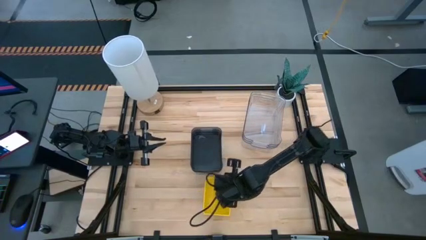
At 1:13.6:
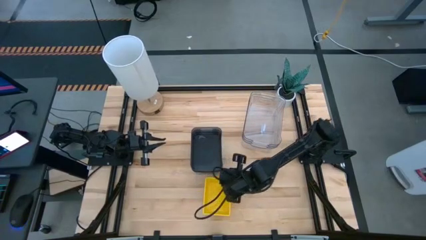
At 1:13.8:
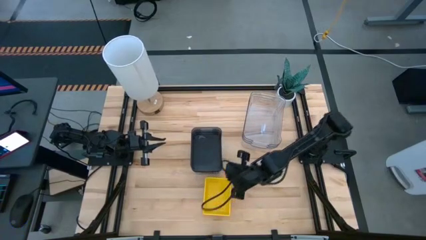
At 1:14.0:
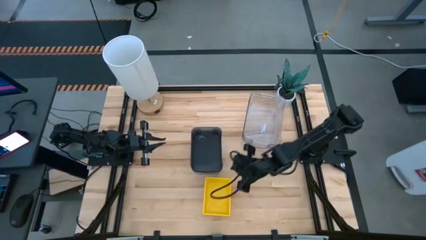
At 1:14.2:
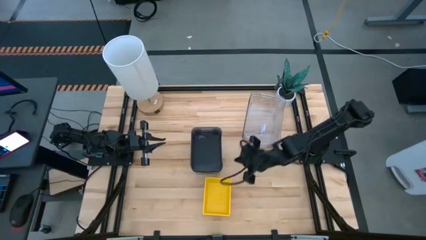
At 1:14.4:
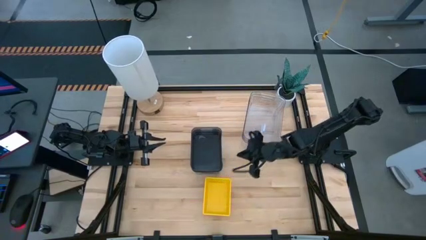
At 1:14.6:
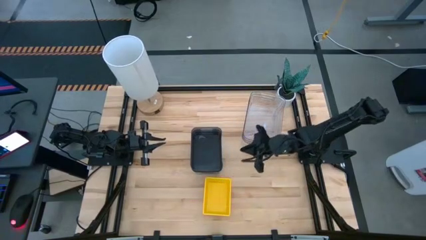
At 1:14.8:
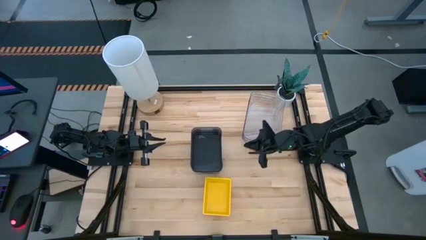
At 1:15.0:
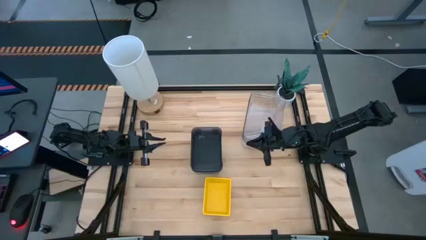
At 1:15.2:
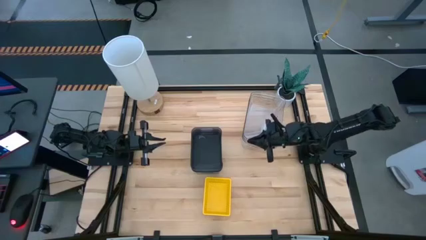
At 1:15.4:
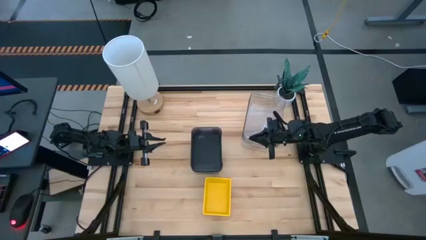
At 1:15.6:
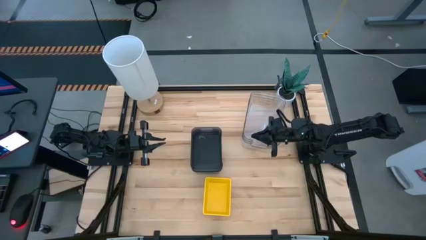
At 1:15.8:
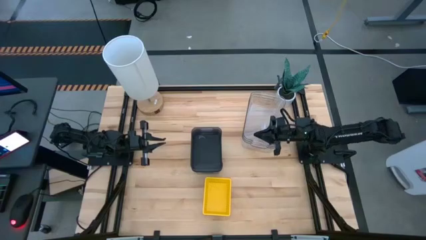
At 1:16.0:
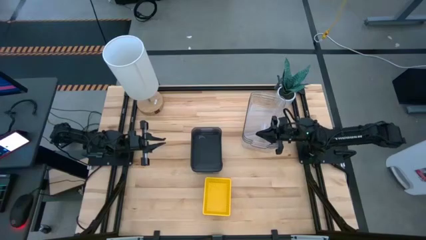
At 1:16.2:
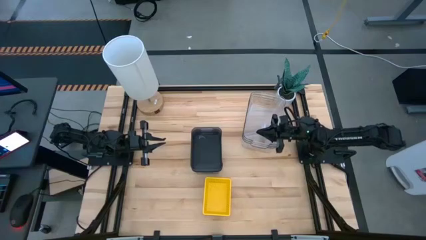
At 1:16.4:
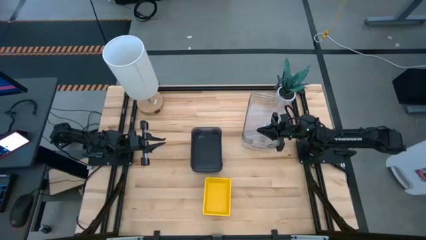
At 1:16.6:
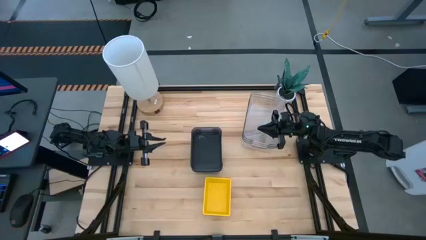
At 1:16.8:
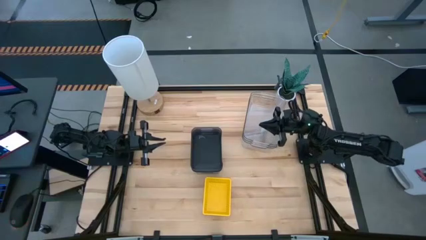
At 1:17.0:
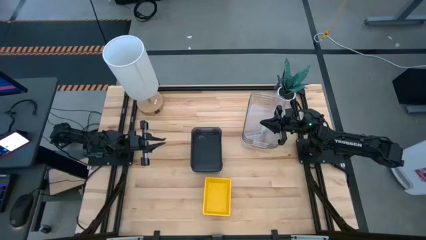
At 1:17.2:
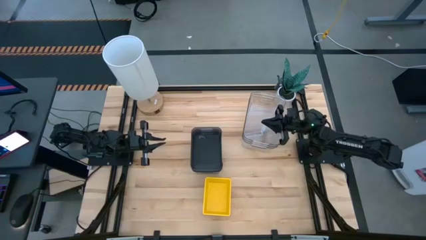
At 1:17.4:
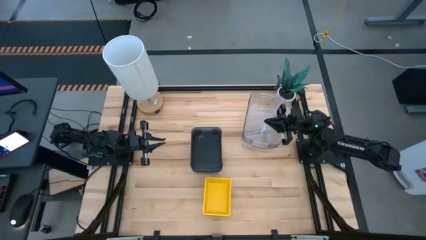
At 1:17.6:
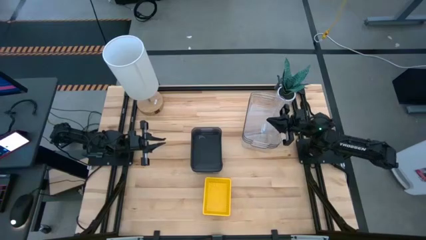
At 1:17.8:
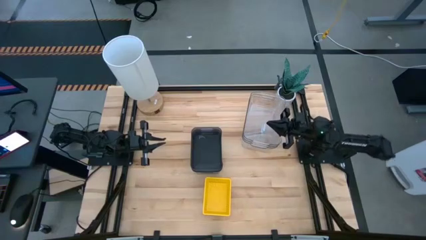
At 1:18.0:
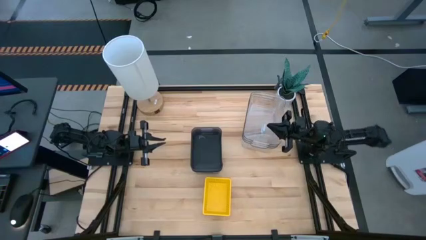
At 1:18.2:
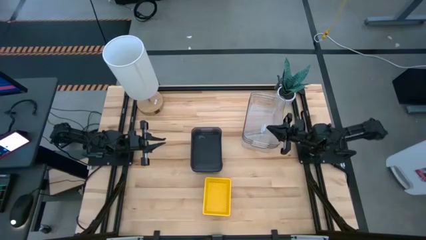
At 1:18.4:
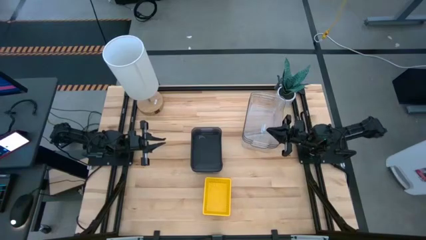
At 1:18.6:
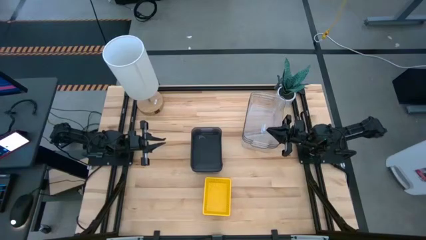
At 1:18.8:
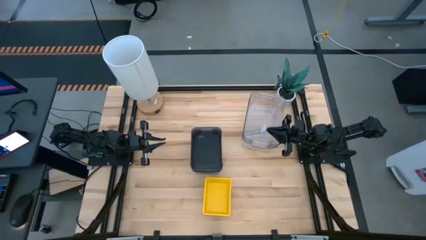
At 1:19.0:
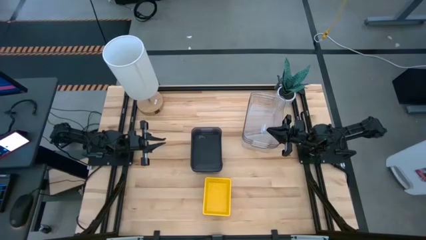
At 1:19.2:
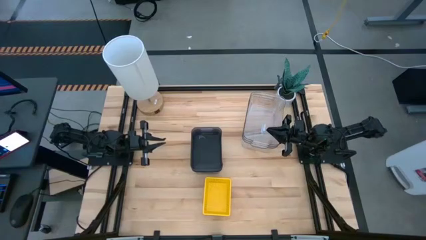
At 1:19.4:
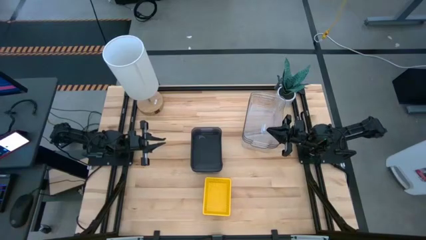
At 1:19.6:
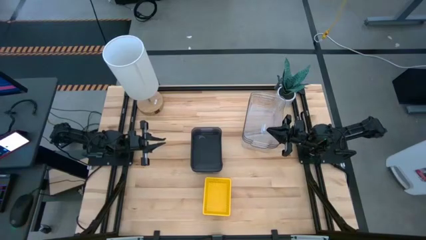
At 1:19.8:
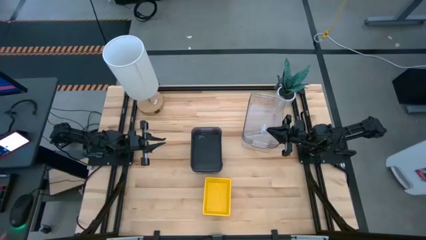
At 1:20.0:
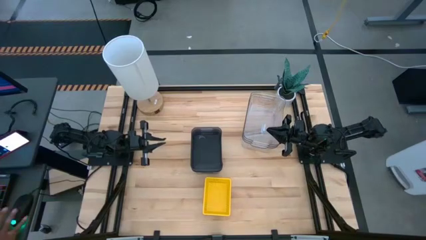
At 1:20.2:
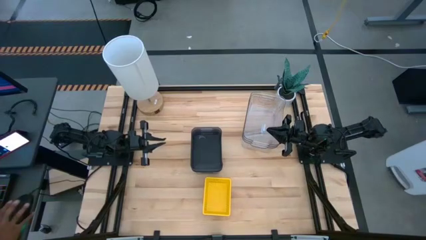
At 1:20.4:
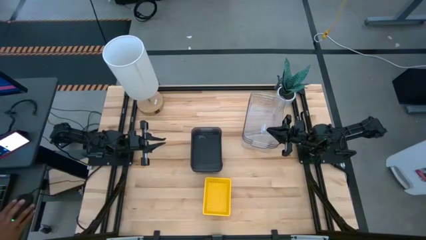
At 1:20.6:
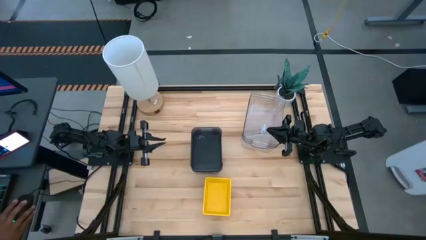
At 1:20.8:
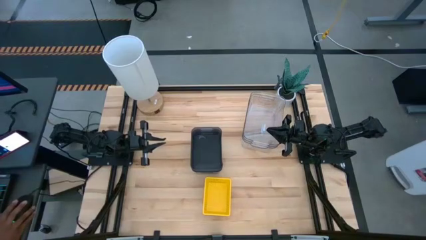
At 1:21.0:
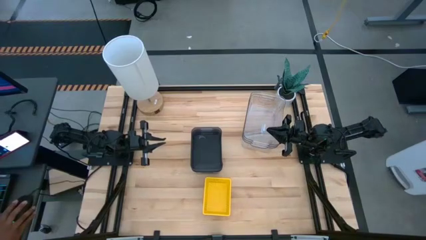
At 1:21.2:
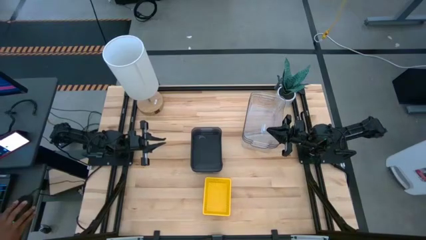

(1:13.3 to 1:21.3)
Return to Home Position
